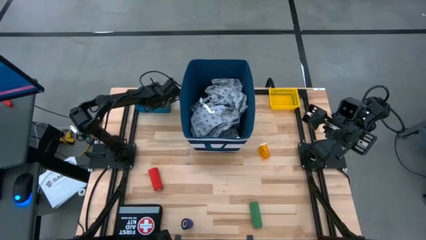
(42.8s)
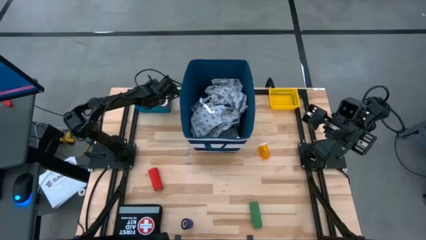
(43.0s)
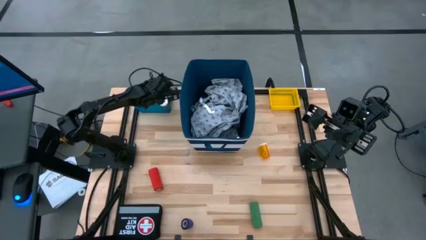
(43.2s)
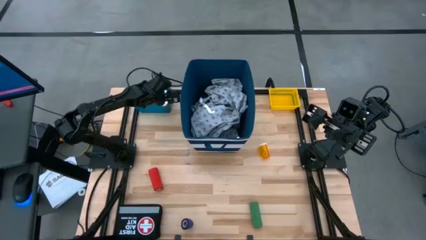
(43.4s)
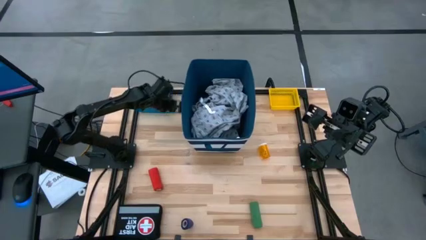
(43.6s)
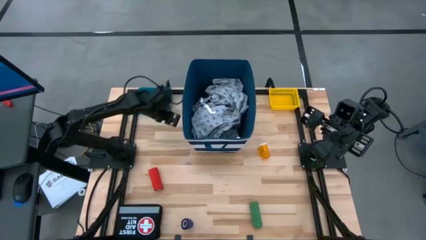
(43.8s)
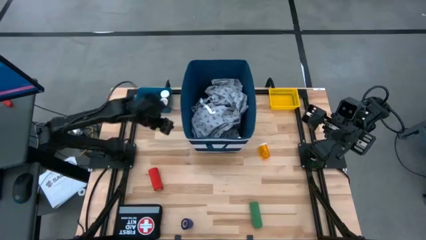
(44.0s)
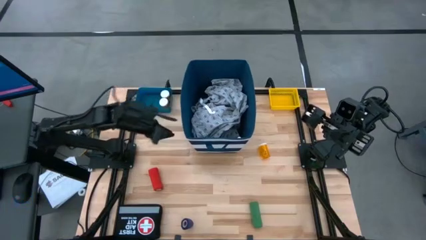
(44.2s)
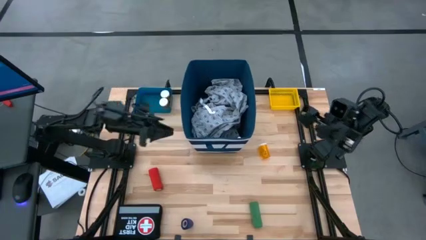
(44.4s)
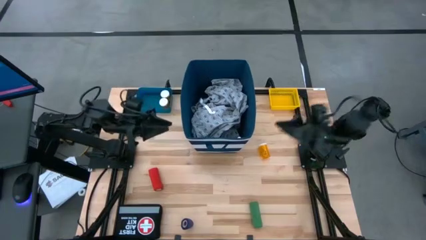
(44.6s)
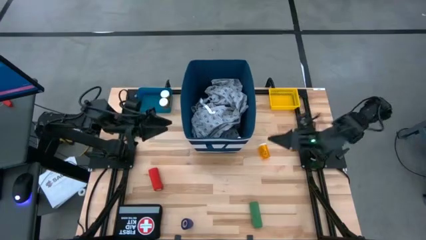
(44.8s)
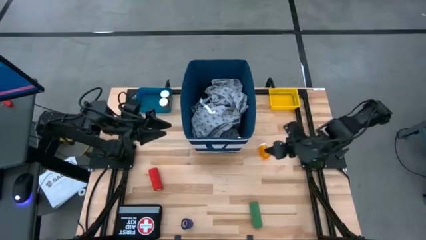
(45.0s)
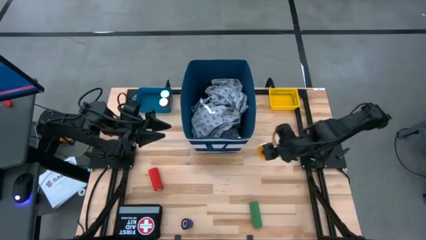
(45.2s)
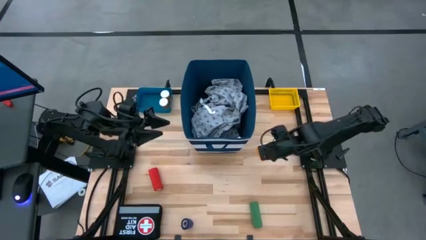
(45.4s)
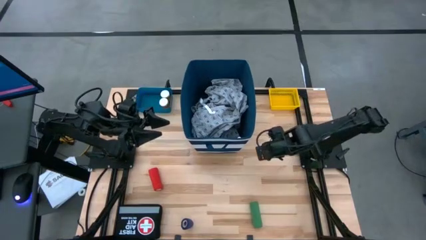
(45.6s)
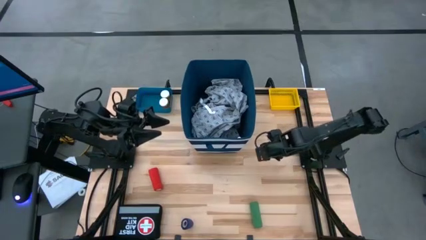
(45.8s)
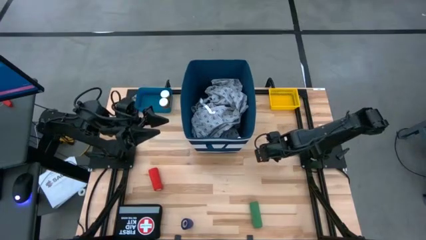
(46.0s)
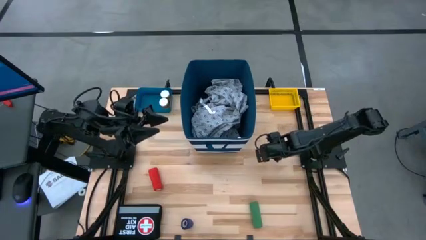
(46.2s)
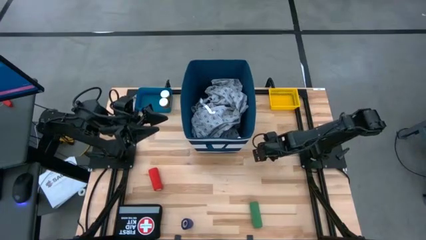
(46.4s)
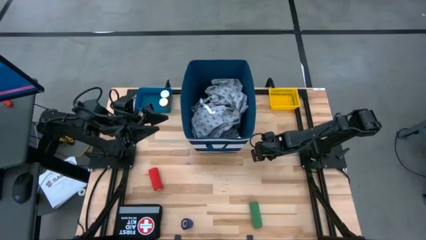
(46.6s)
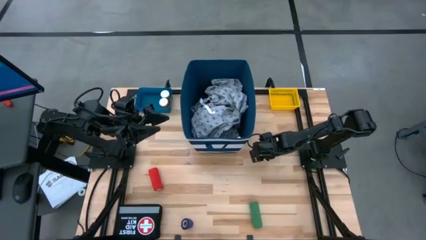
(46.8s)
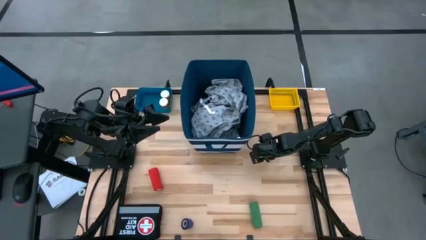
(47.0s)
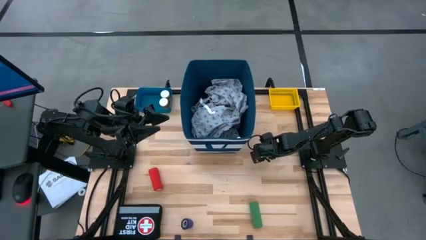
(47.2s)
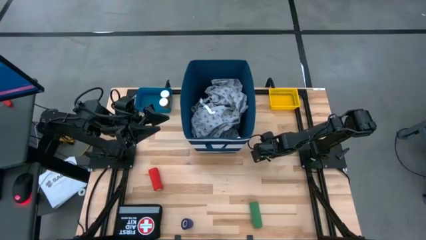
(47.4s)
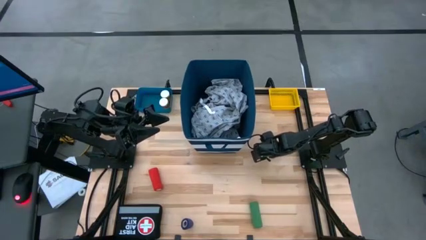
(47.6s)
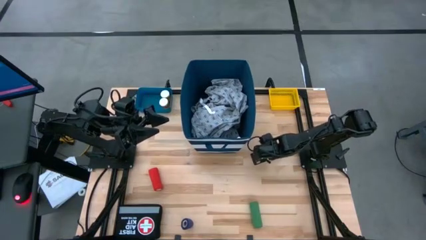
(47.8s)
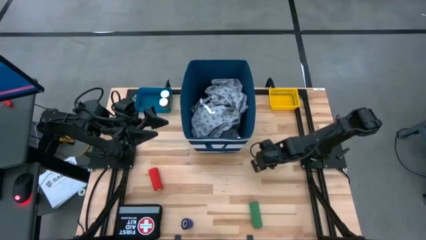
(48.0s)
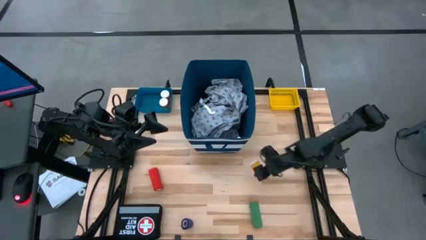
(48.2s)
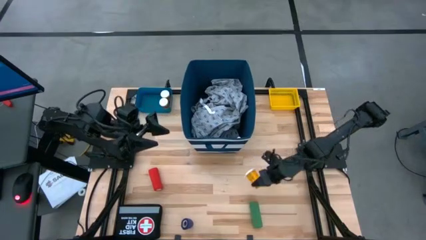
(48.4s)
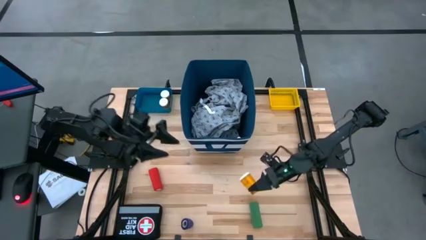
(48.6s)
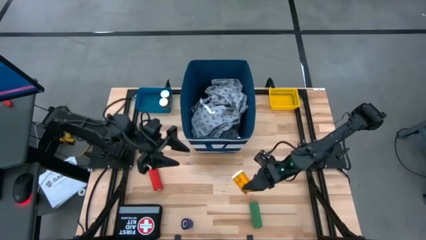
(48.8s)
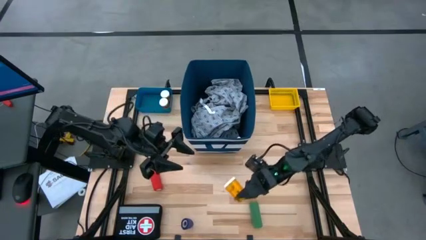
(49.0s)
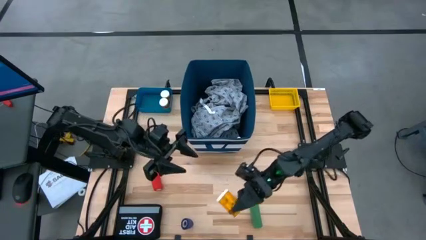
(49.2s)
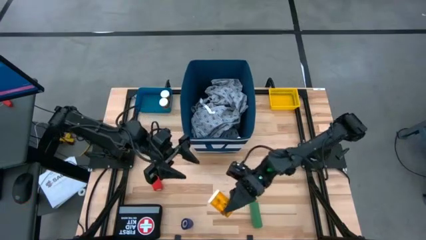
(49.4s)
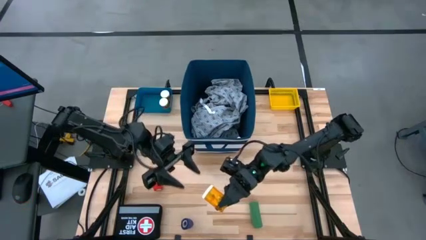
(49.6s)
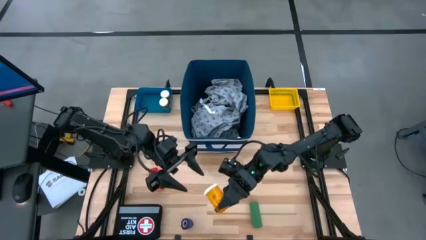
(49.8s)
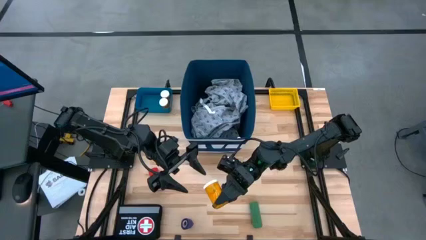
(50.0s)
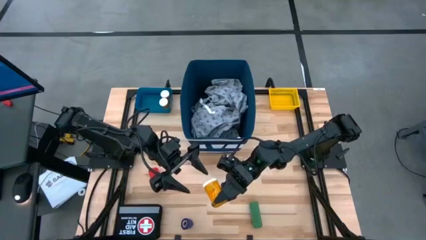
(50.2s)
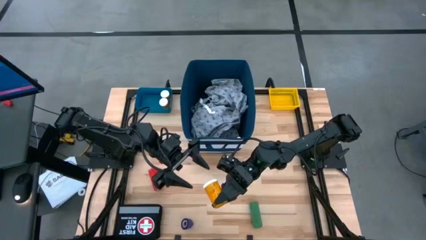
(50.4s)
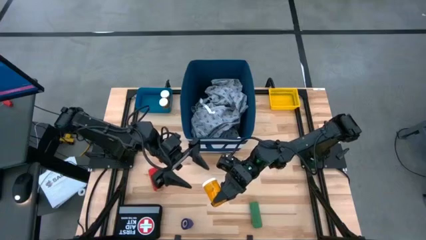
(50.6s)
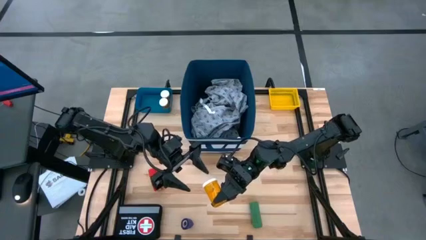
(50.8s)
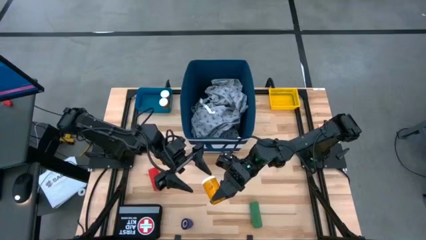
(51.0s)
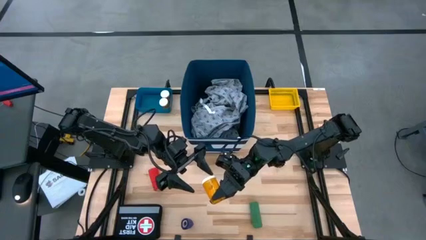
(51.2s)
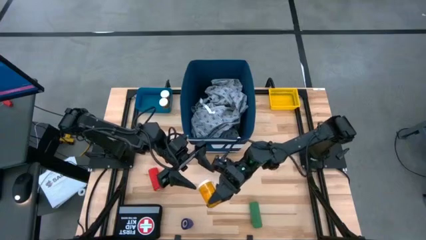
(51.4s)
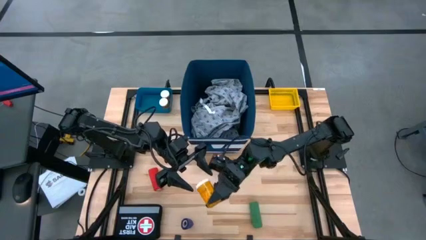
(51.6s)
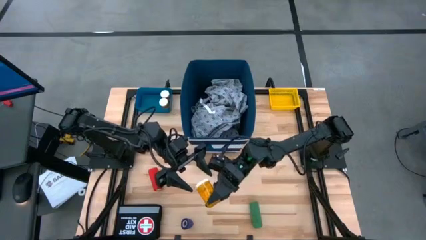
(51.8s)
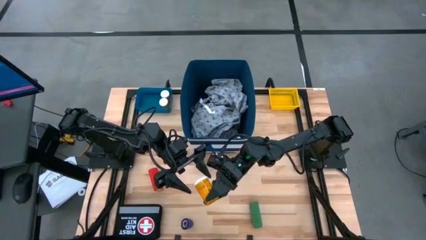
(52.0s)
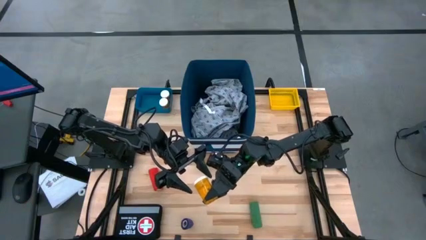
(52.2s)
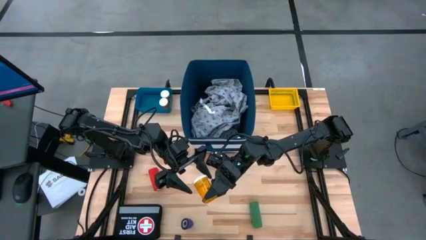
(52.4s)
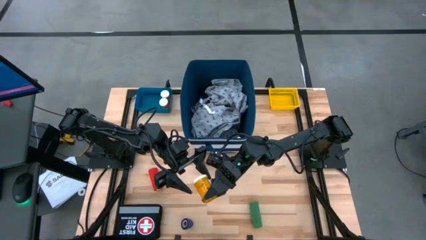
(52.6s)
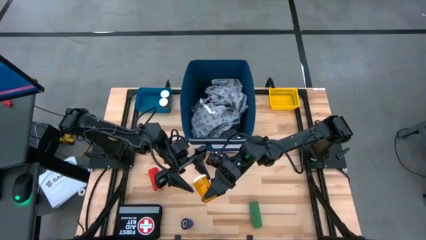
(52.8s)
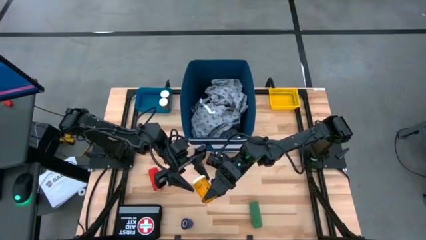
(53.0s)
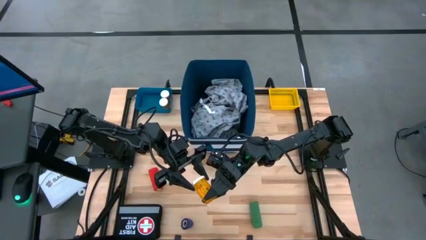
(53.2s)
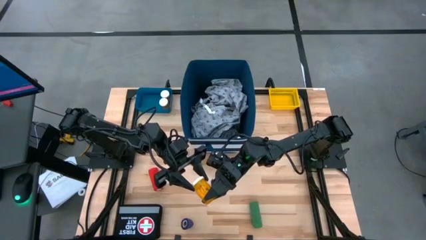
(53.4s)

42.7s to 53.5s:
Task: Pick & place medical supplies in basket/bin
Put the orange pill bottle into the blue bin
